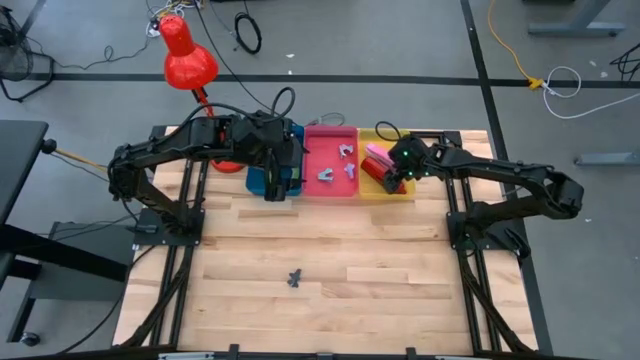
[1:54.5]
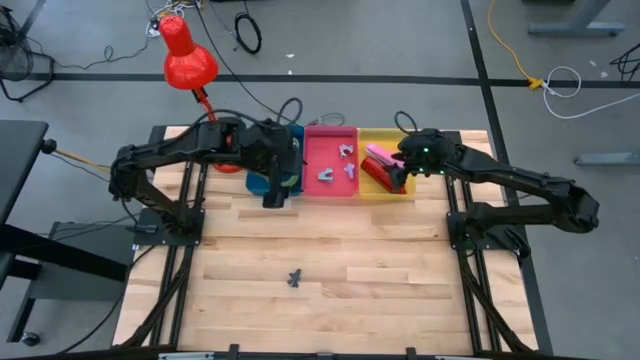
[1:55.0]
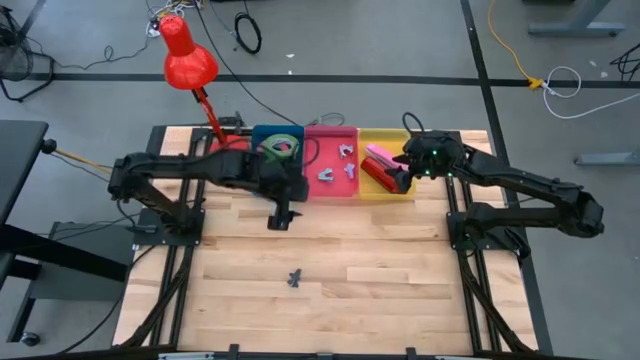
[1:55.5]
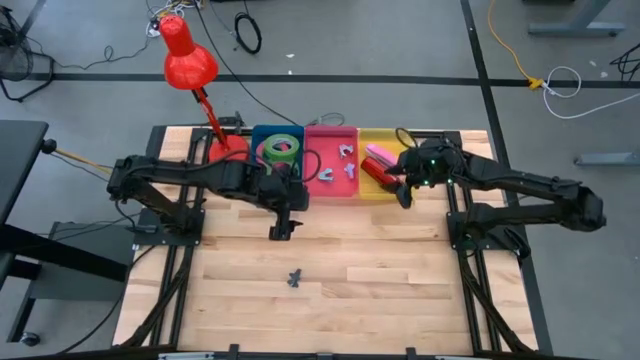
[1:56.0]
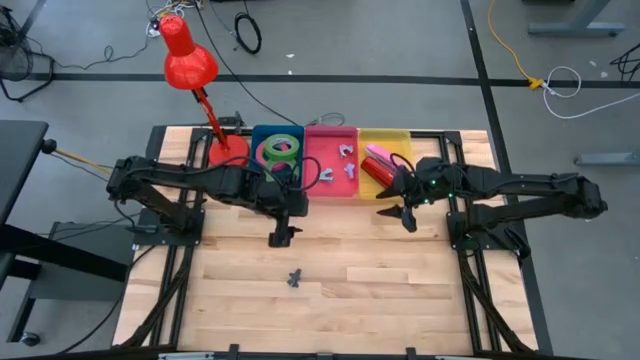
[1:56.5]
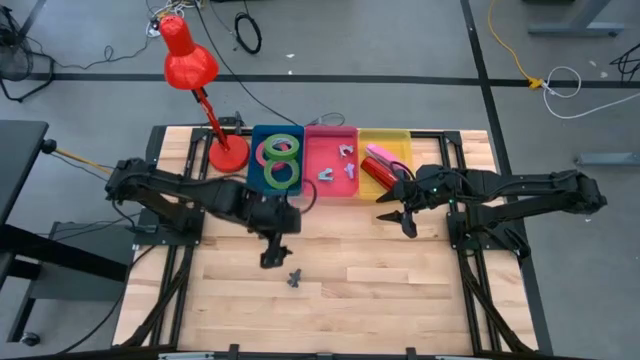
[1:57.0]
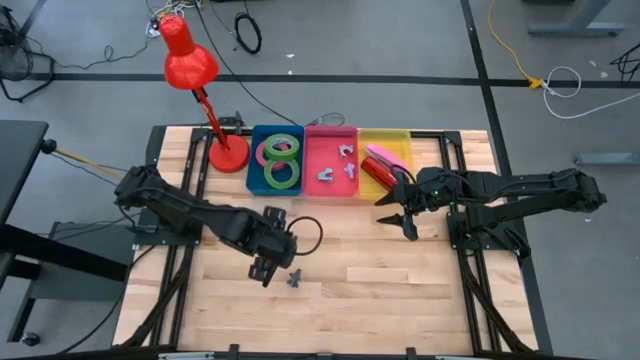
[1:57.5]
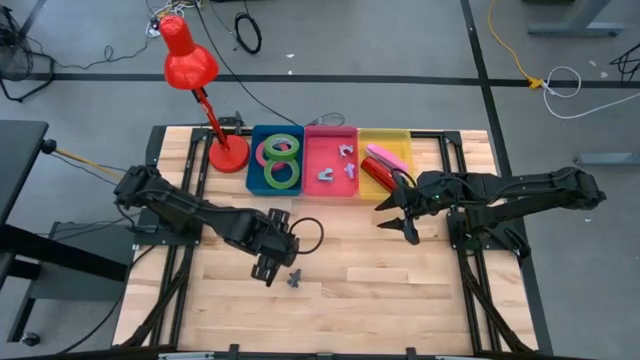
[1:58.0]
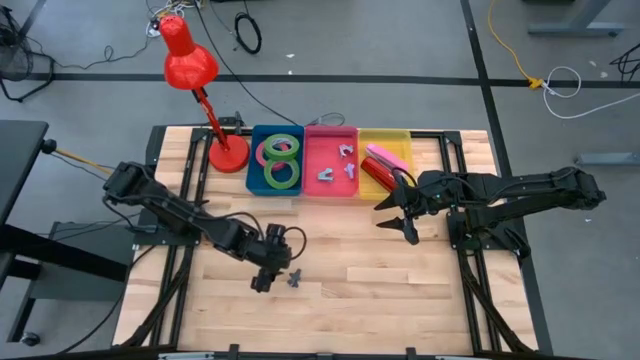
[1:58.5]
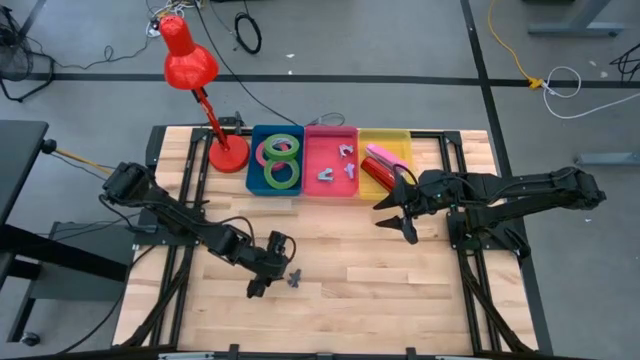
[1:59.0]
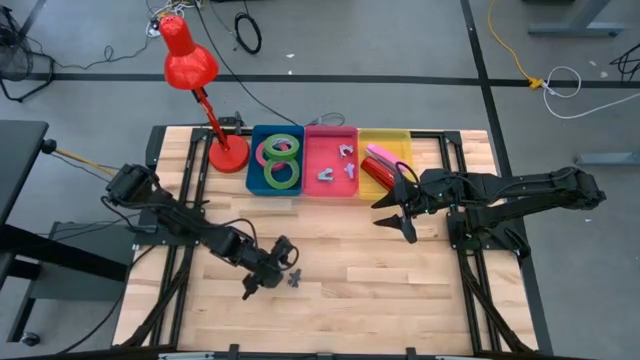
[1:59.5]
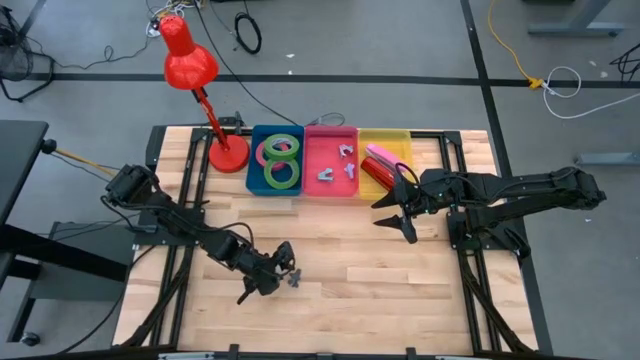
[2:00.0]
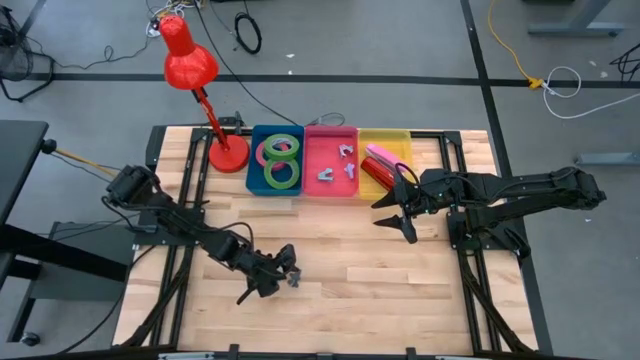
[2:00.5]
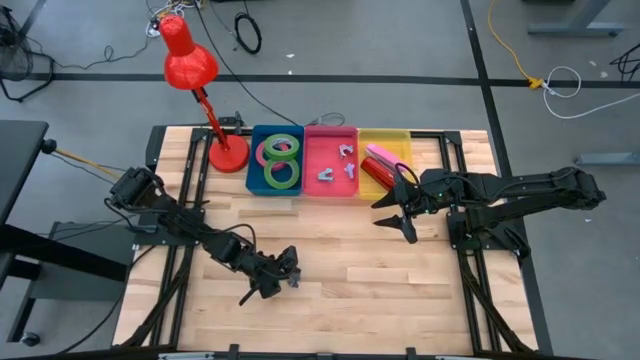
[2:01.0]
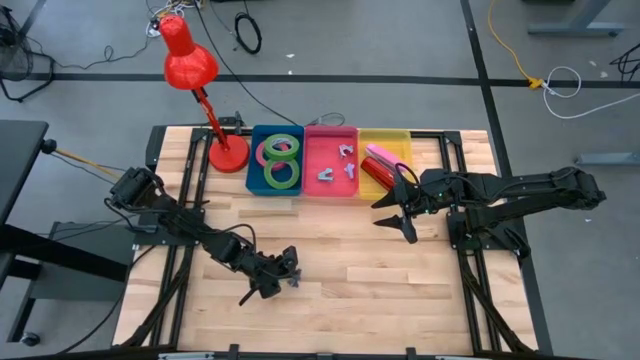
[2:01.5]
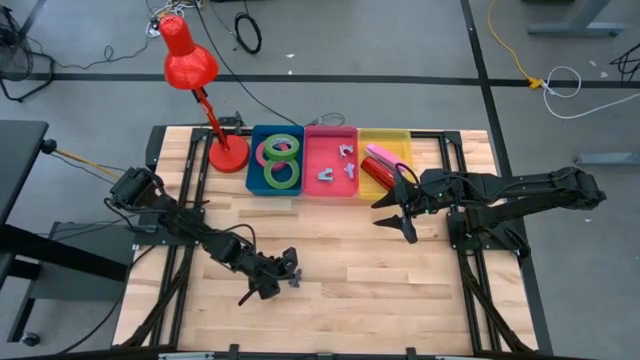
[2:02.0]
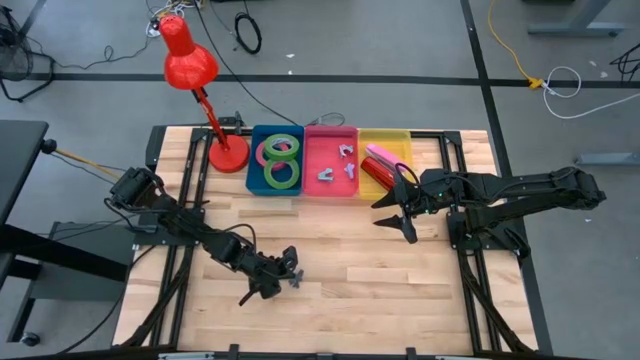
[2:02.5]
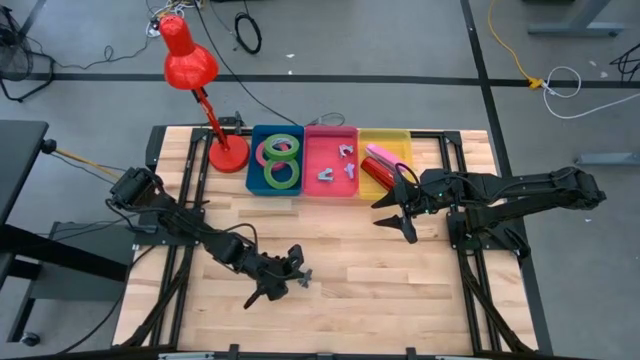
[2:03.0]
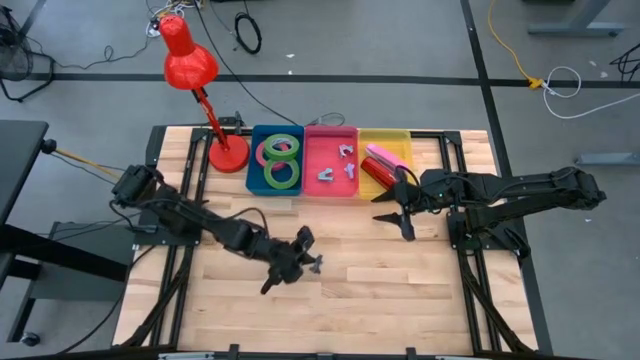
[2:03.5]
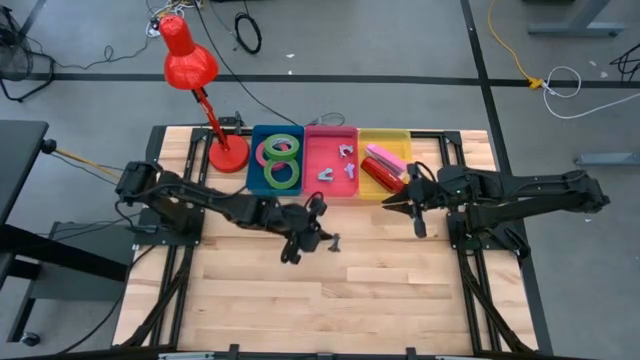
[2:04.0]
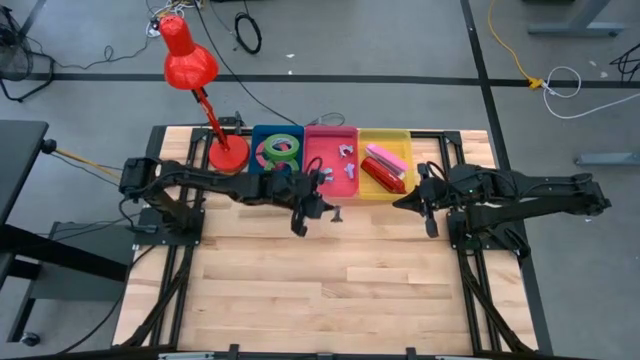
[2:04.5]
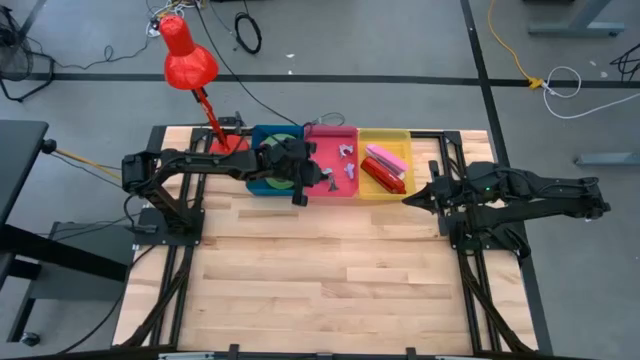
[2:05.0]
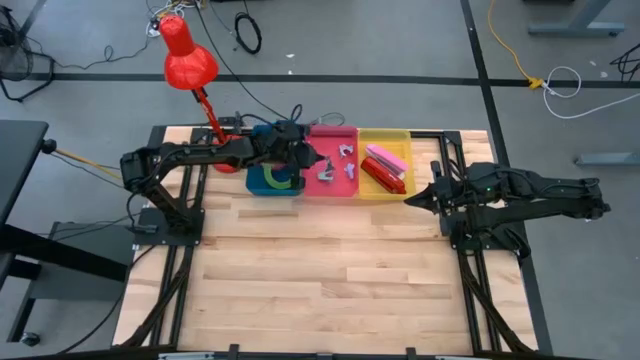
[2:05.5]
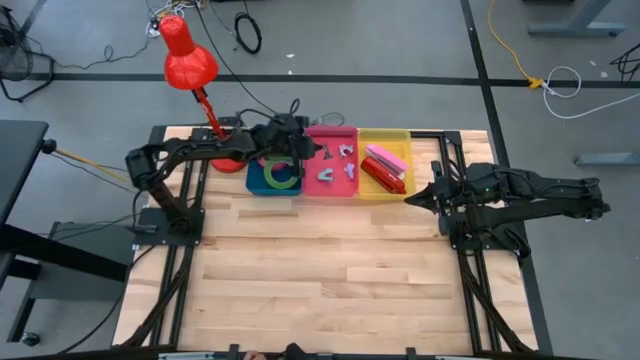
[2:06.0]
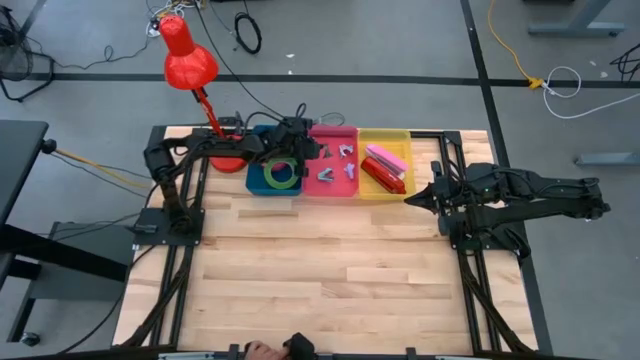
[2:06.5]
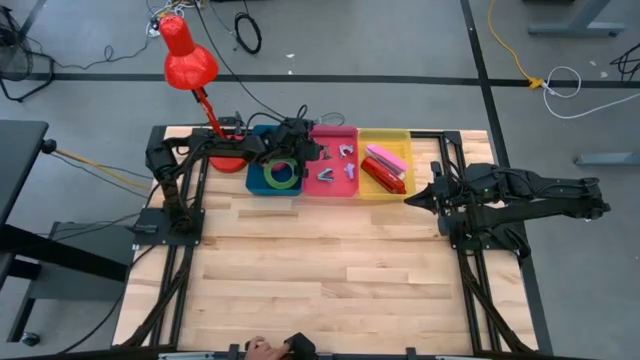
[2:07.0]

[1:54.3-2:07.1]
Task: Pick and place Stapler, Stapler remover, tape
Put the black staple remover into the red bin

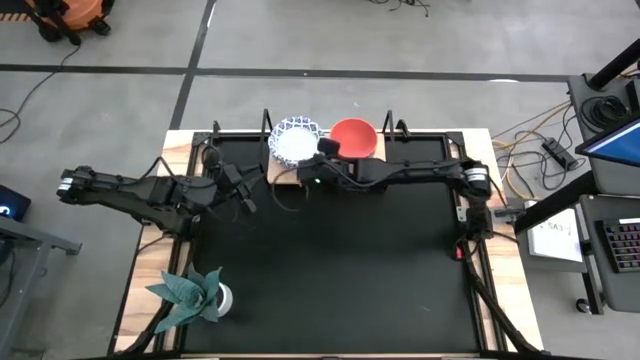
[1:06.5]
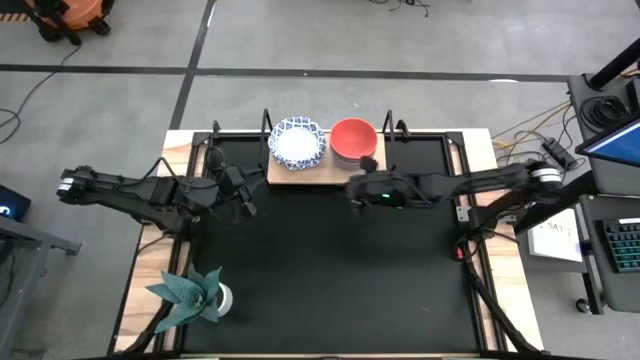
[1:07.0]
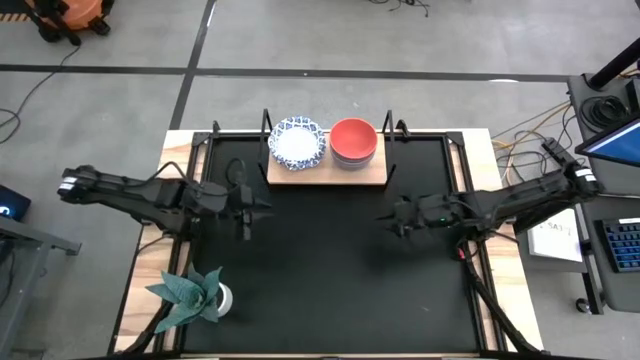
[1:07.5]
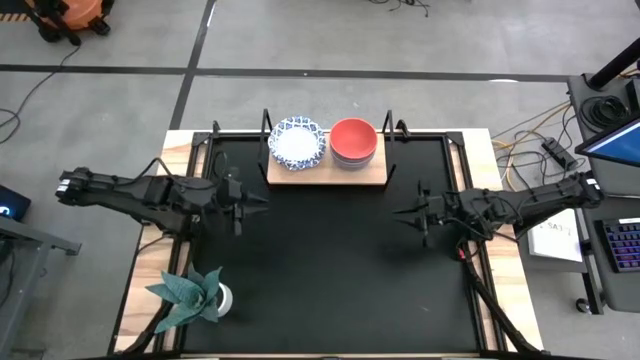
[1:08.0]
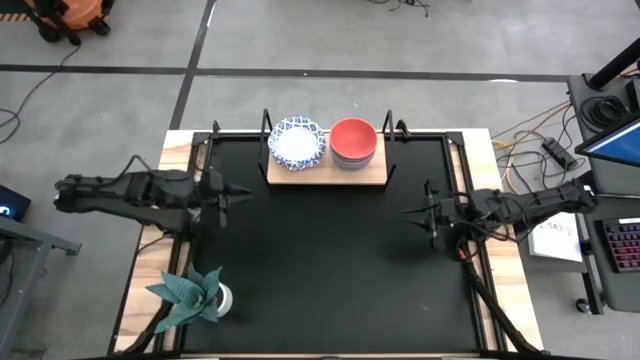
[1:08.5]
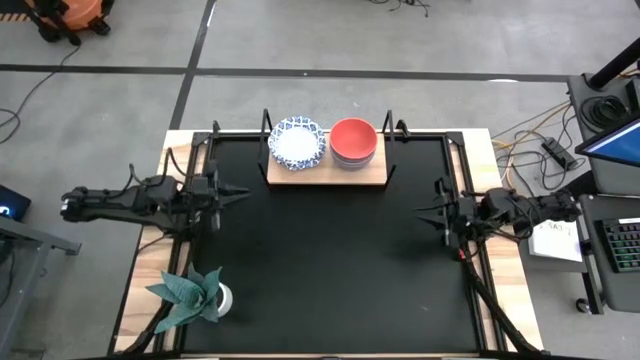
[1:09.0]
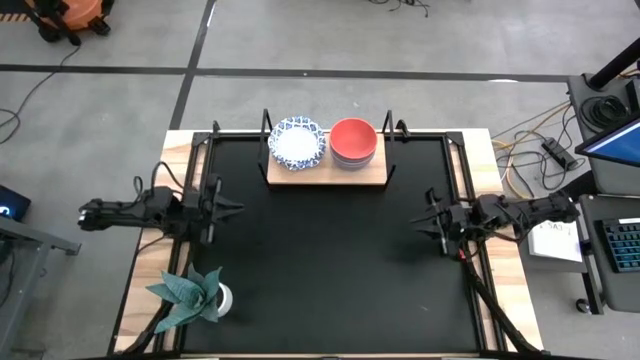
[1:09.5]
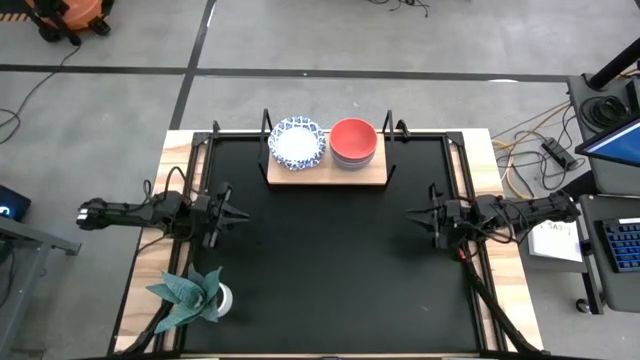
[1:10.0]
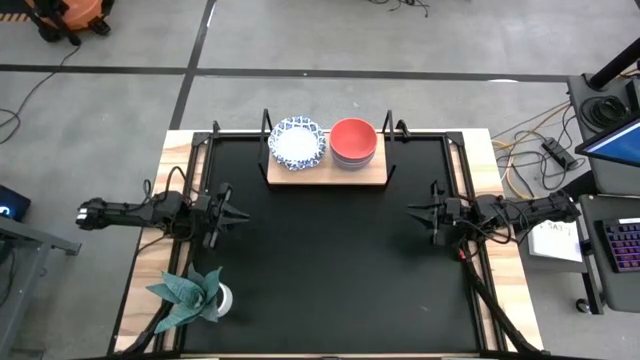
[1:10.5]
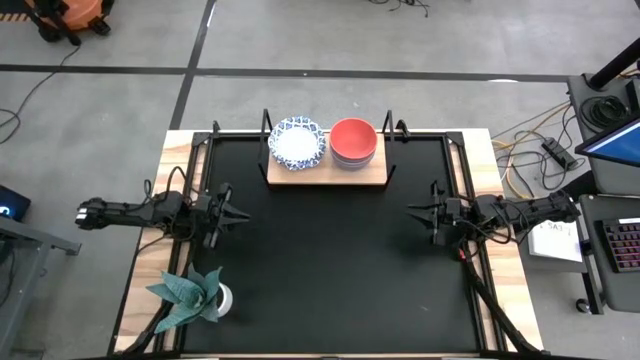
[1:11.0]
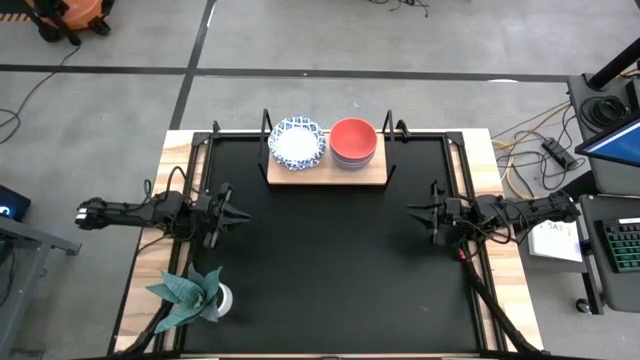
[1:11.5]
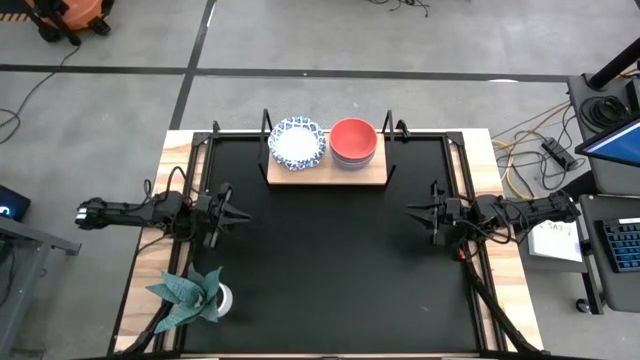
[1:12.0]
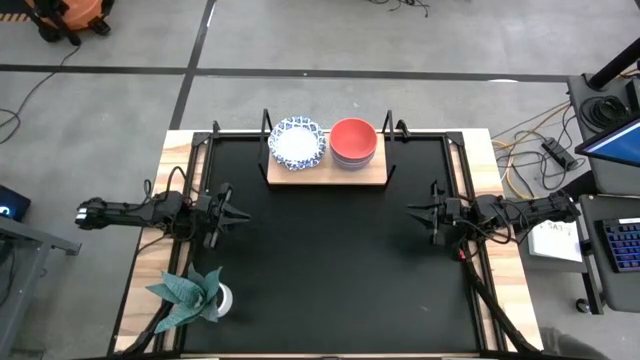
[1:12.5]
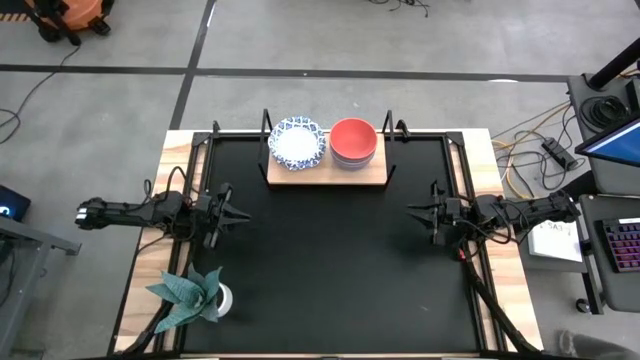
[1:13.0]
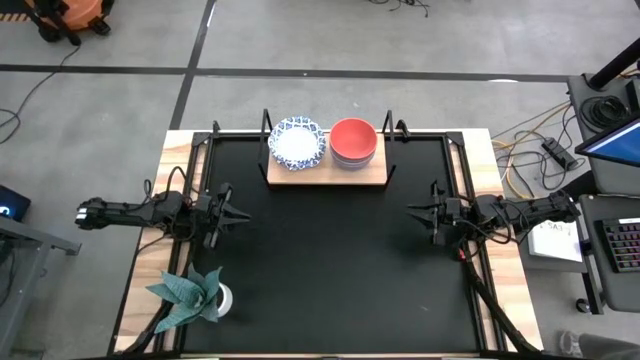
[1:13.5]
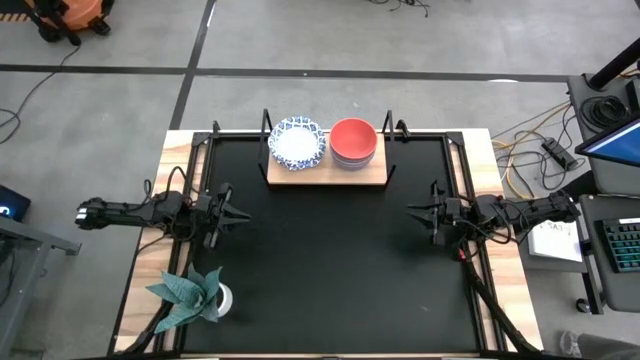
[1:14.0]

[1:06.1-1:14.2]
Task: Place and stack bowls onto a shelf
Return to Home Position
